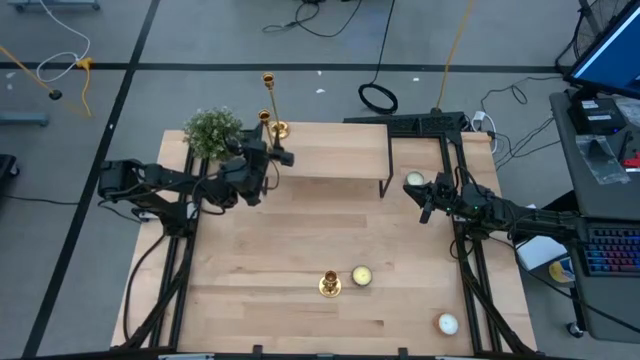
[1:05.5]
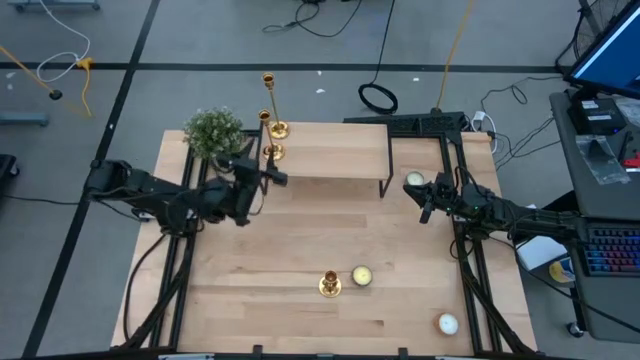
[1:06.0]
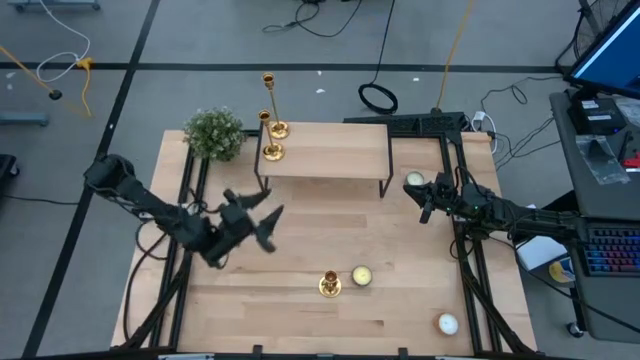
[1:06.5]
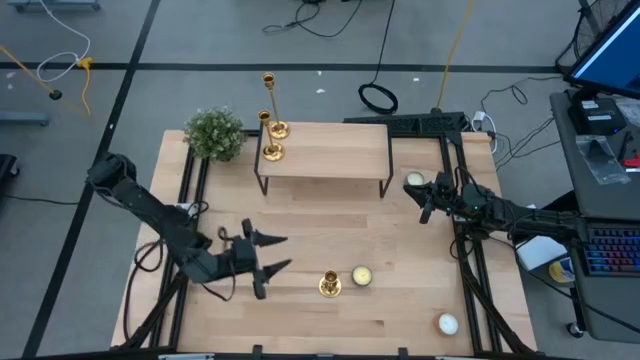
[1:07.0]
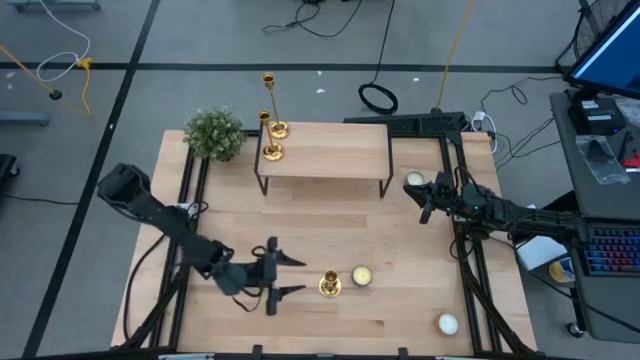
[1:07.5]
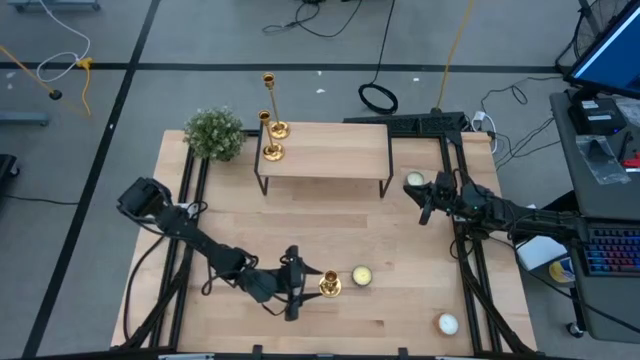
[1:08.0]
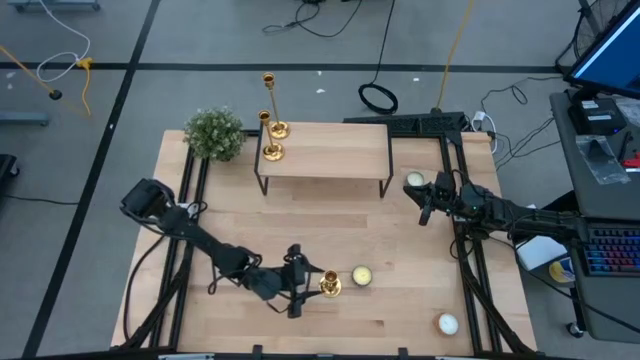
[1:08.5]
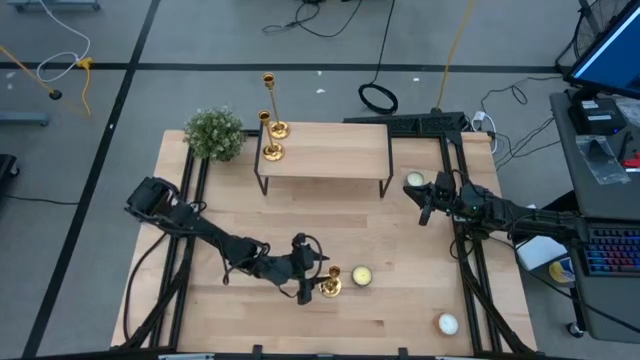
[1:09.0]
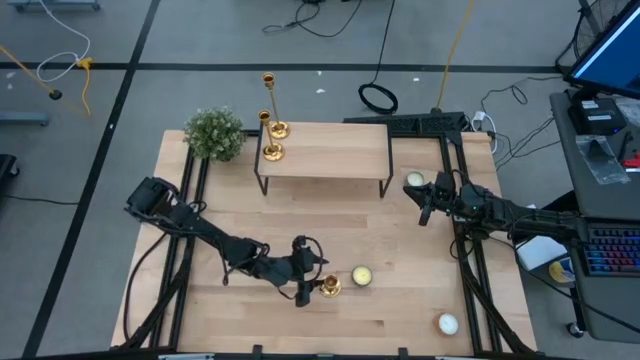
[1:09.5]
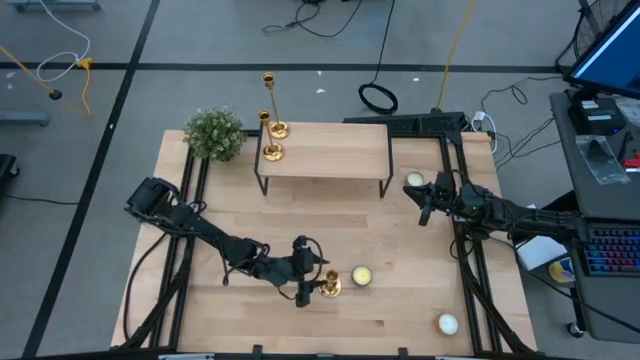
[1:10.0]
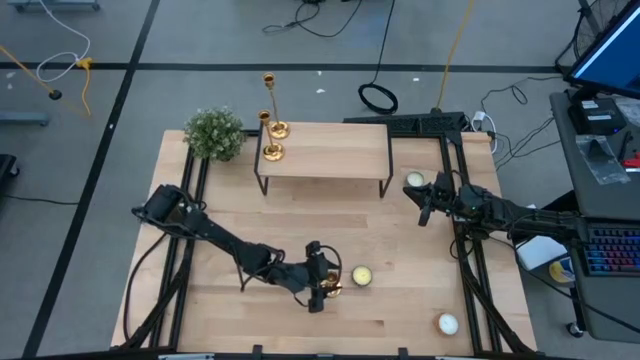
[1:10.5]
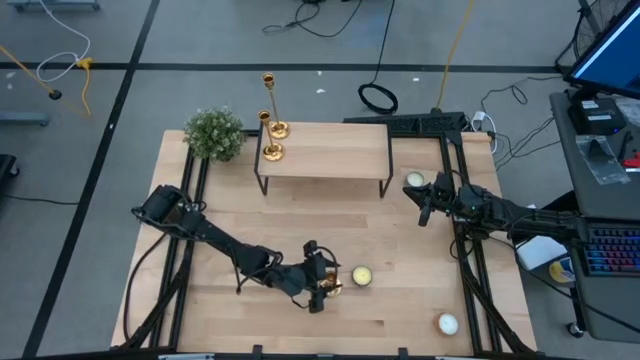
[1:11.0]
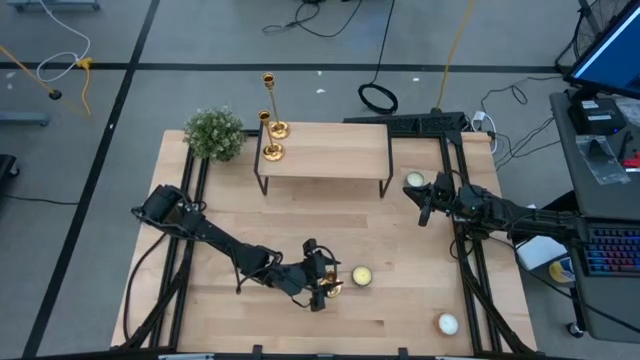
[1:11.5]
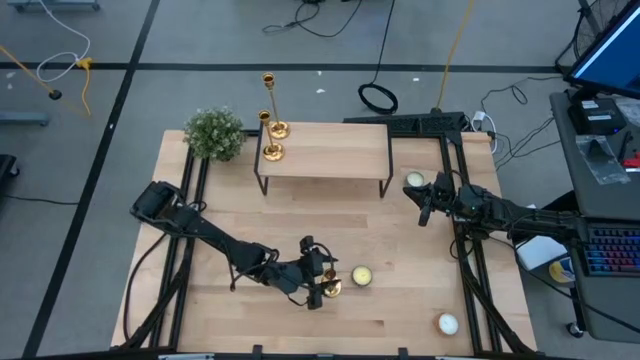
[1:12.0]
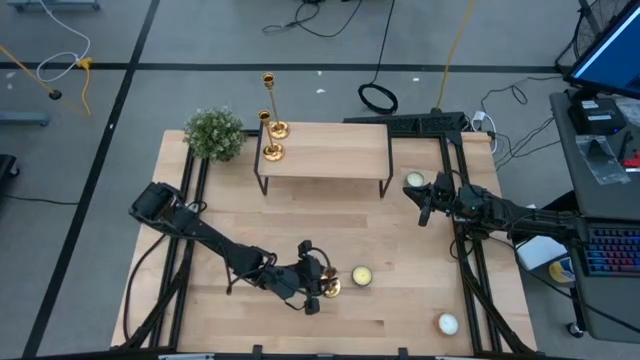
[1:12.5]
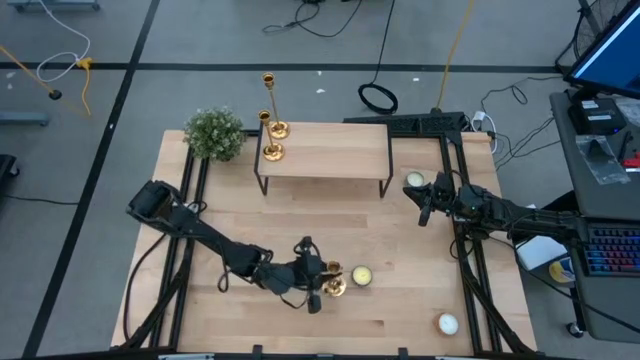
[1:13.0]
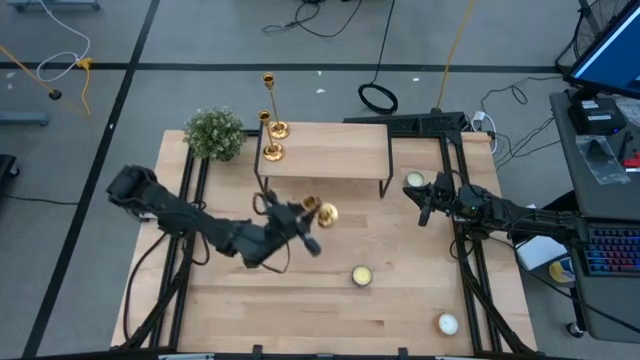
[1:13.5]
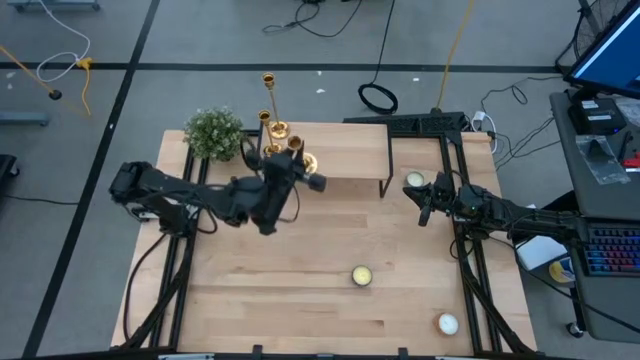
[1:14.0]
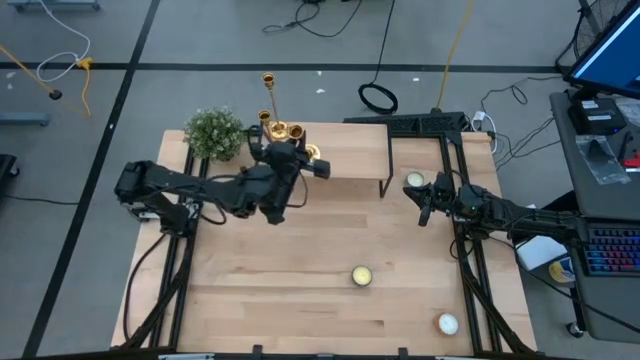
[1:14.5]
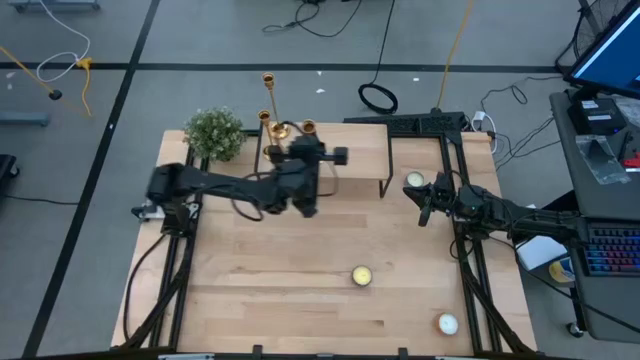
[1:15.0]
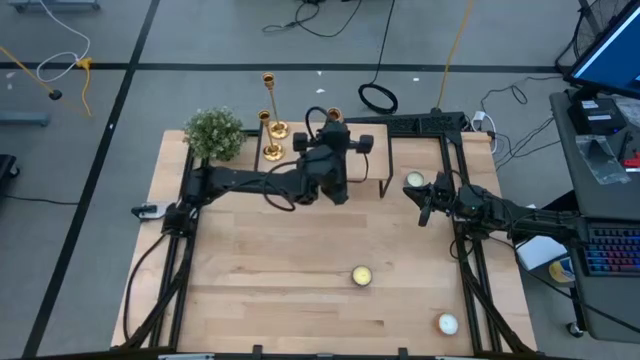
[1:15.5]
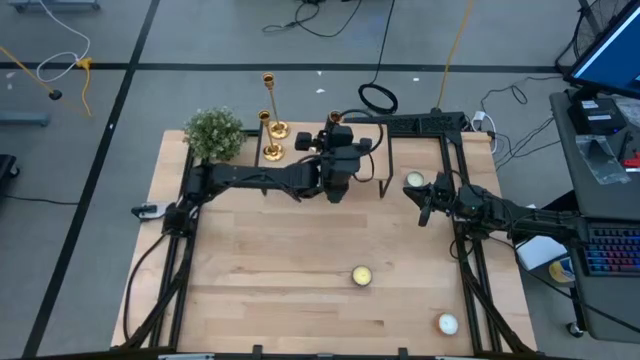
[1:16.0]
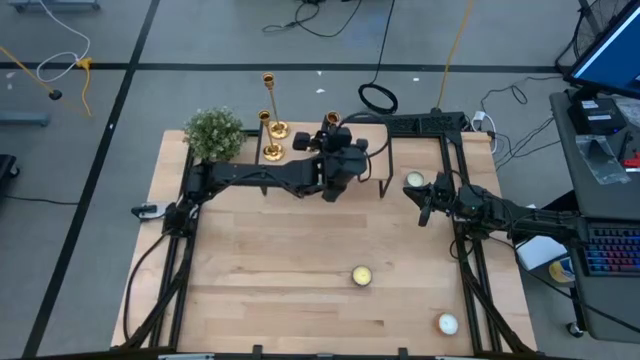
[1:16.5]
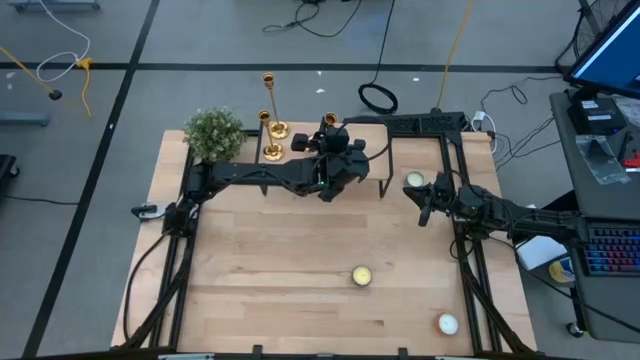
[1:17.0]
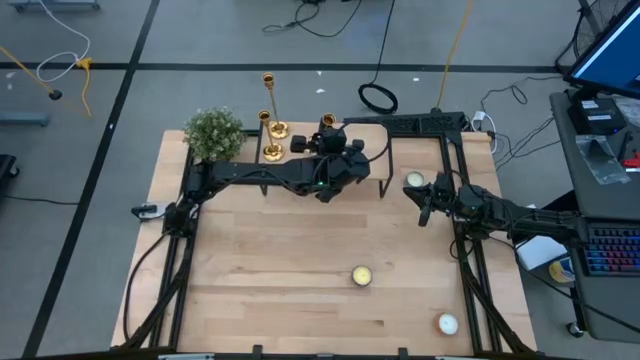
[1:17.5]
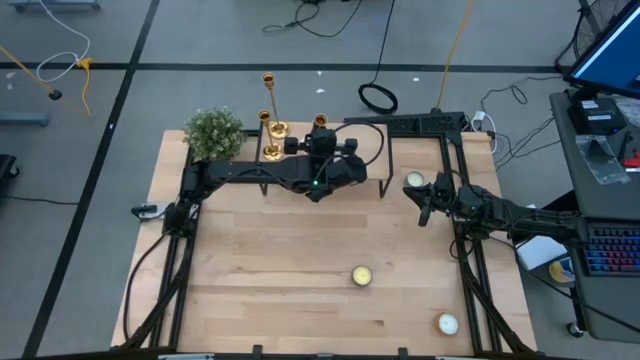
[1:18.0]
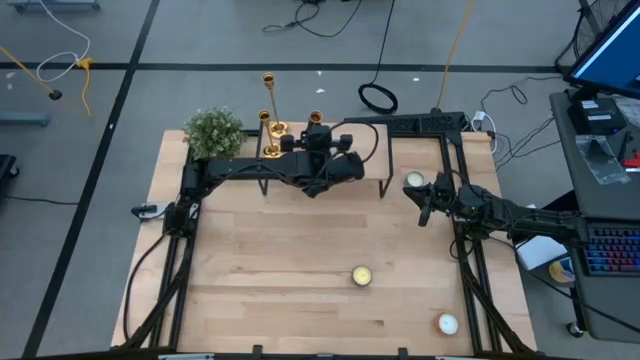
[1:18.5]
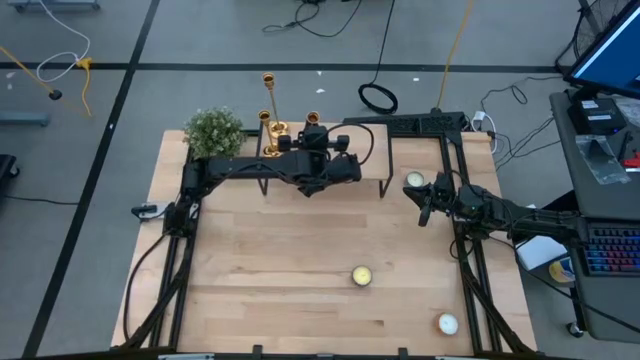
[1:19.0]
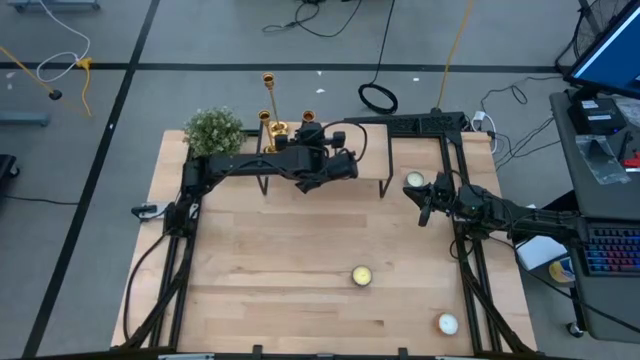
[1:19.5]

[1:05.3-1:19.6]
Task: Pick & Place candle stick holders
Put the gold candle holder on the shelf
